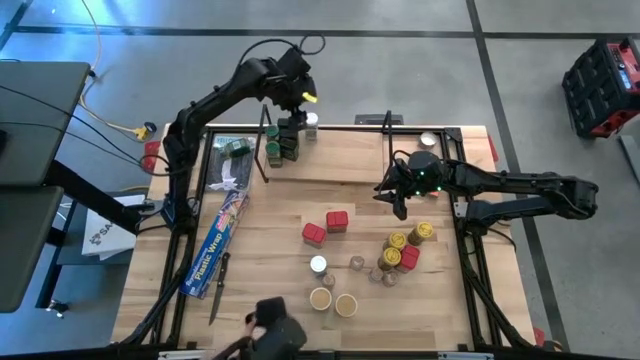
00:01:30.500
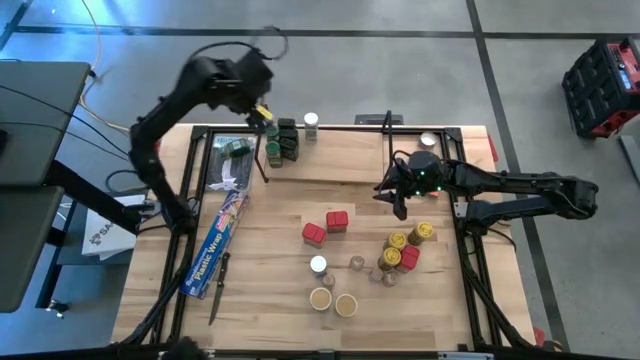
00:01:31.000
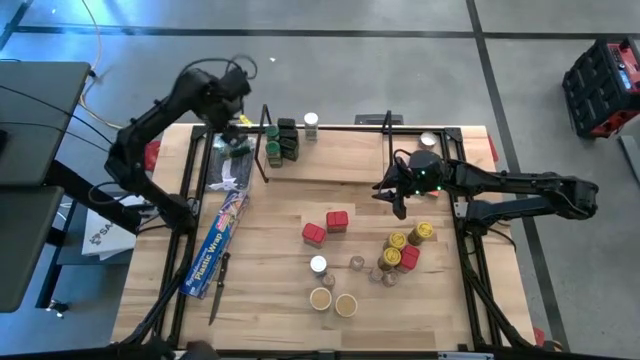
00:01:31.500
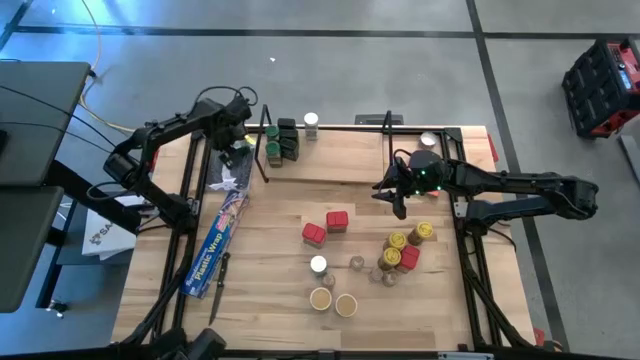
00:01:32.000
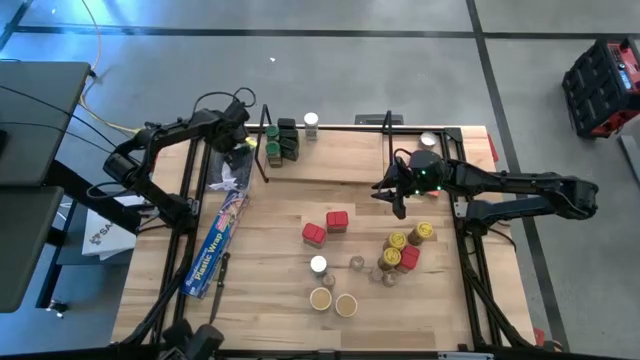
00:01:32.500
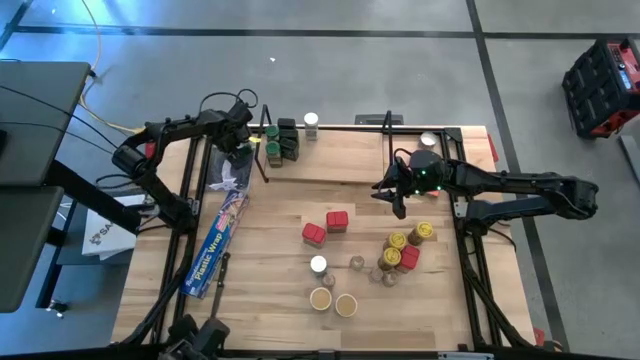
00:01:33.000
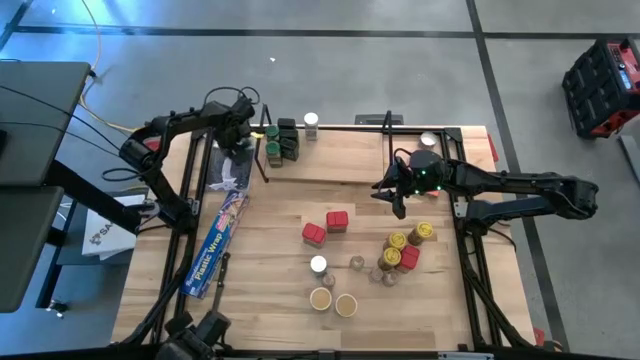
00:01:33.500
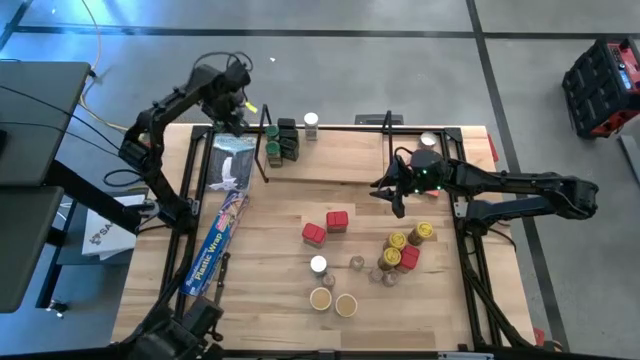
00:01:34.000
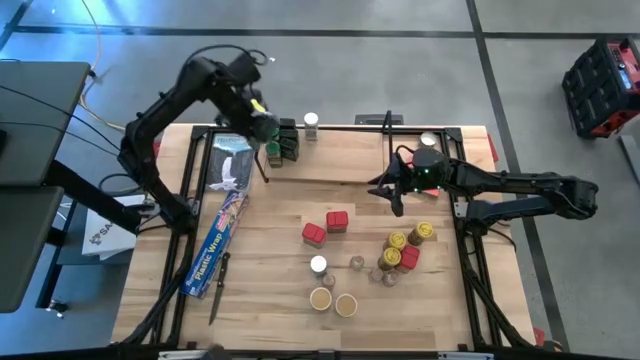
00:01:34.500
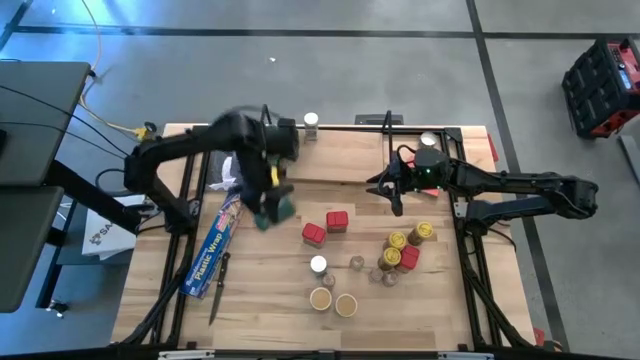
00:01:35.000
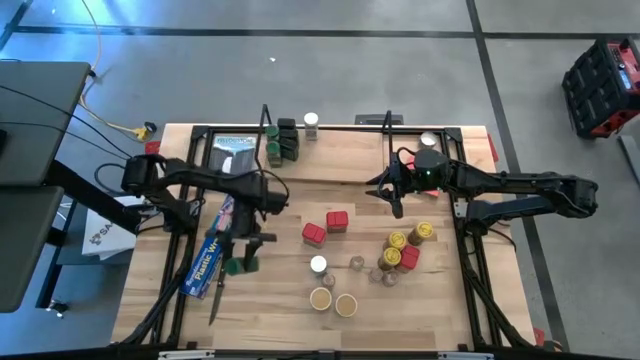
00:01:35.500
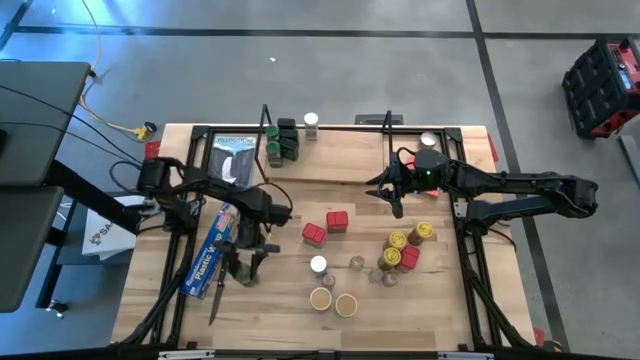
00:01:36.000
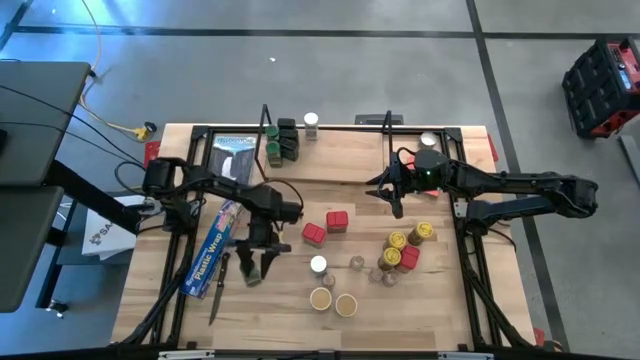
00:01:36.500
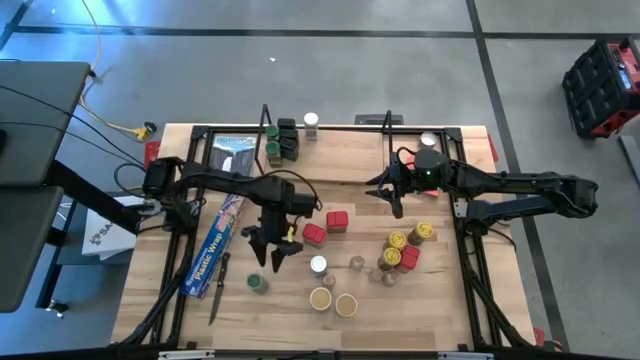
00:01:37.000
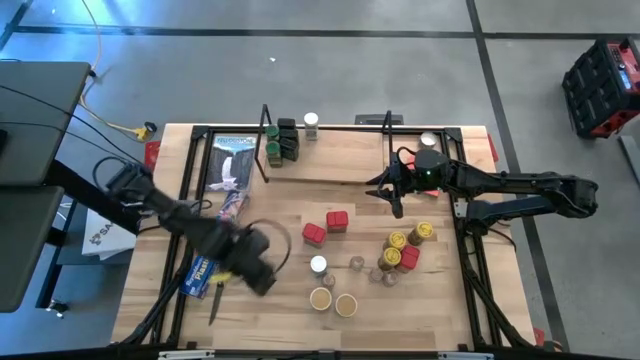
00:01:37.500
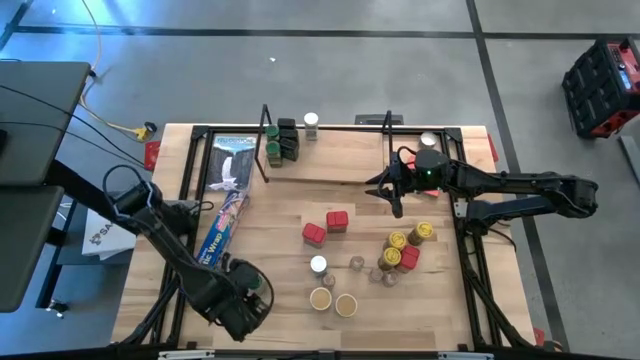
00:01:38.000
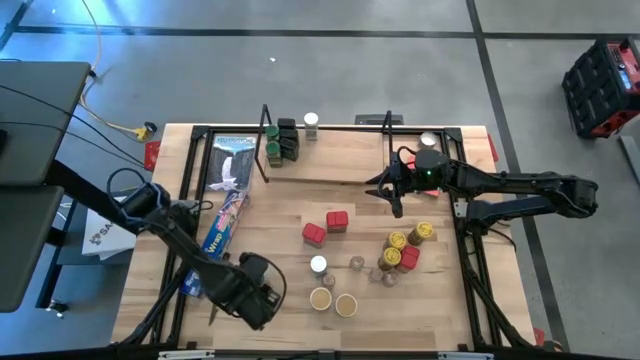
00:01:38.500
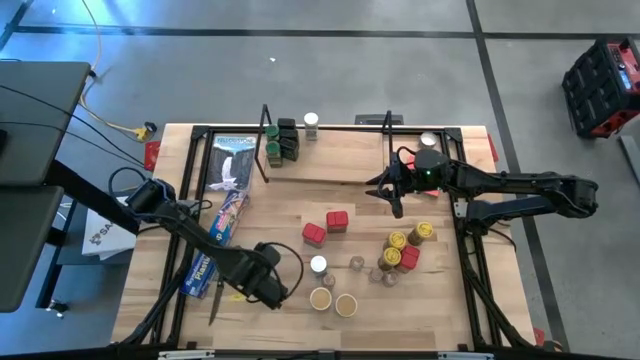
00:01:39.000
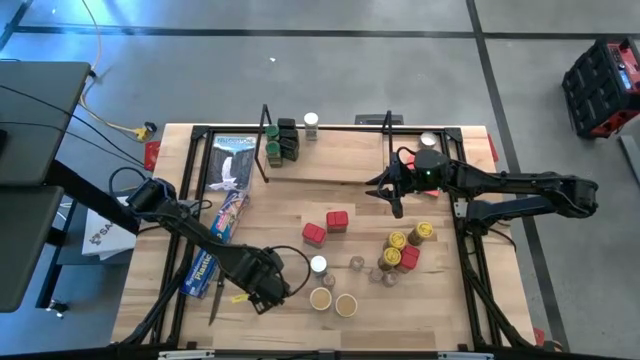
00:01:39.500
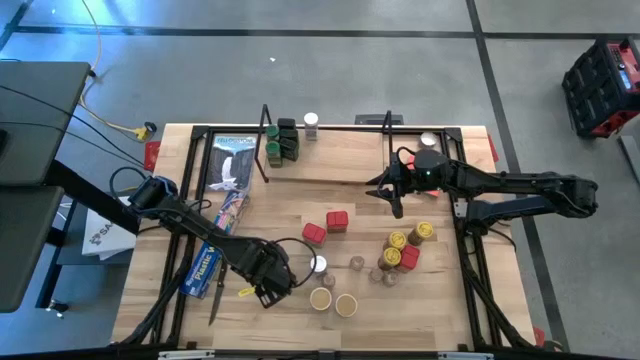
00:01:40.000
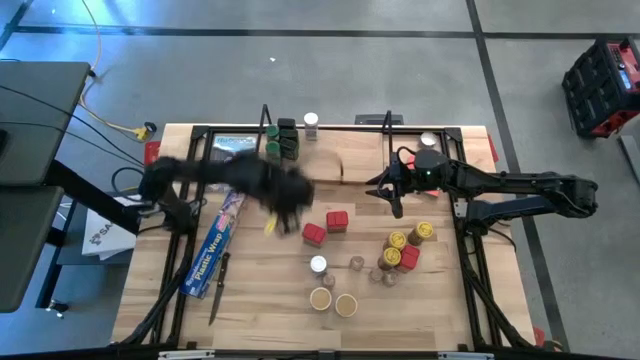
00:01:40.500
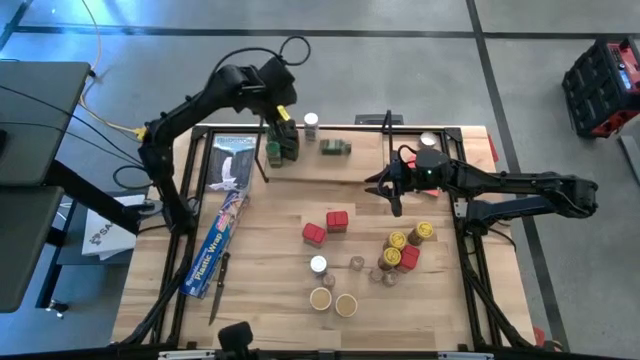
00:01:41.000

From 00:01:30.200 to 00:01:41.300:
Task: Shelf spices
Put the green seasoning bottle on the shelf and align it with the other green seasoning bottles

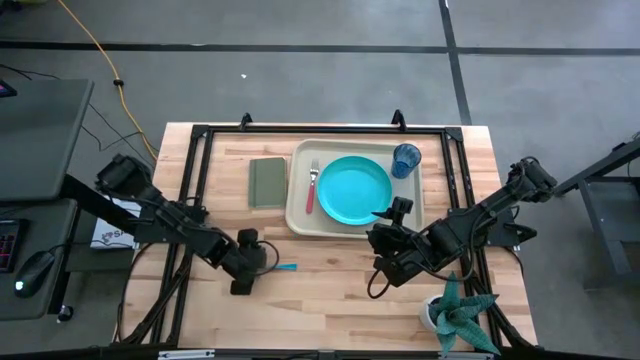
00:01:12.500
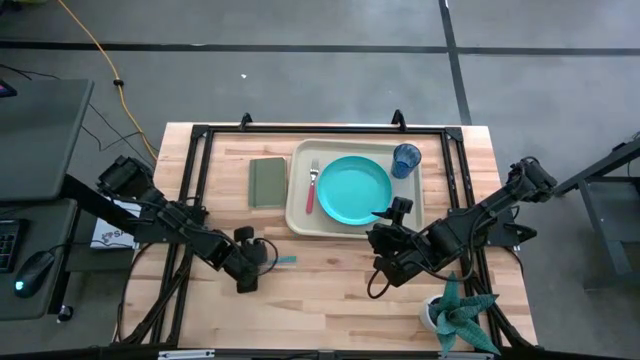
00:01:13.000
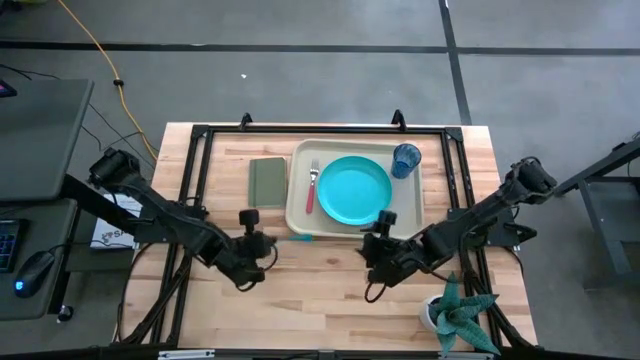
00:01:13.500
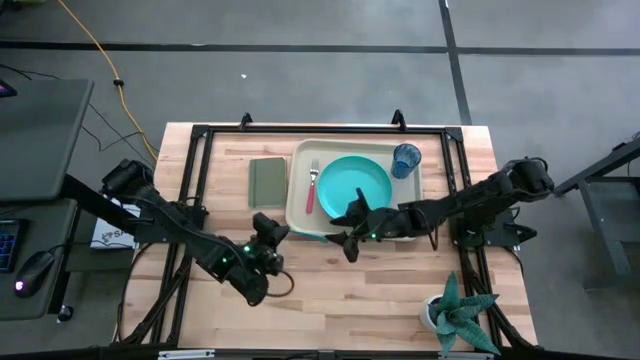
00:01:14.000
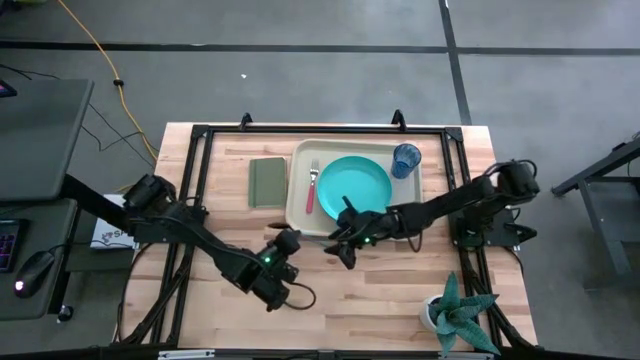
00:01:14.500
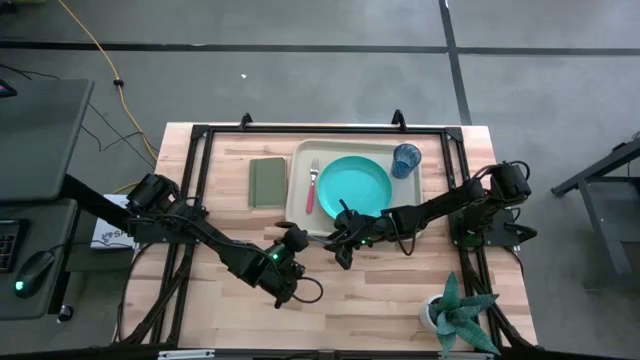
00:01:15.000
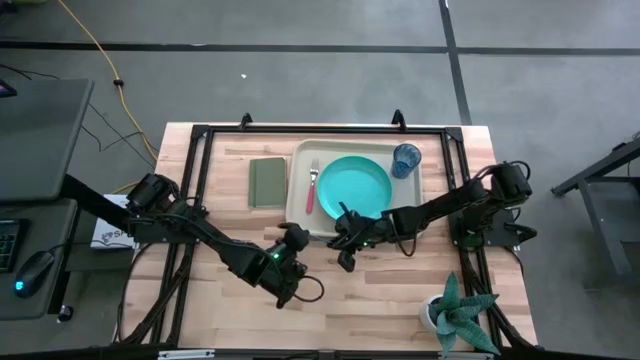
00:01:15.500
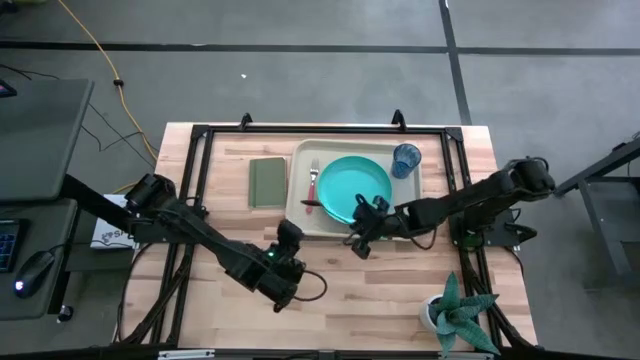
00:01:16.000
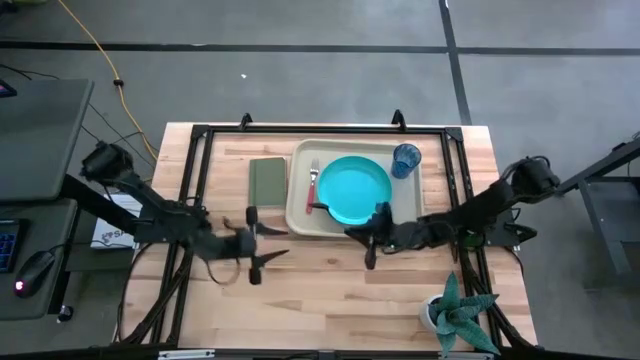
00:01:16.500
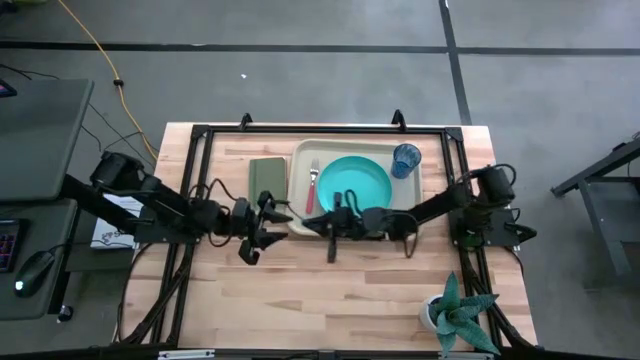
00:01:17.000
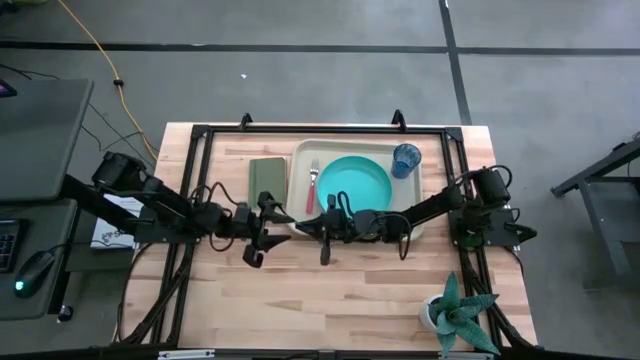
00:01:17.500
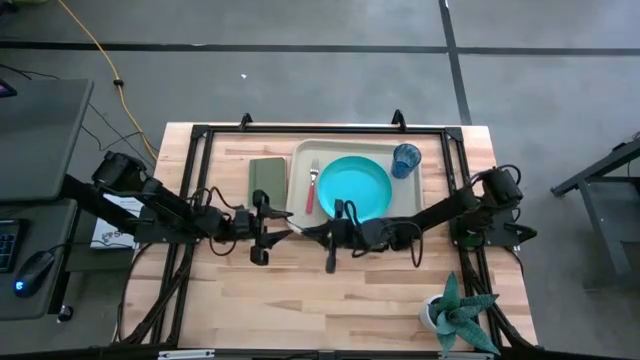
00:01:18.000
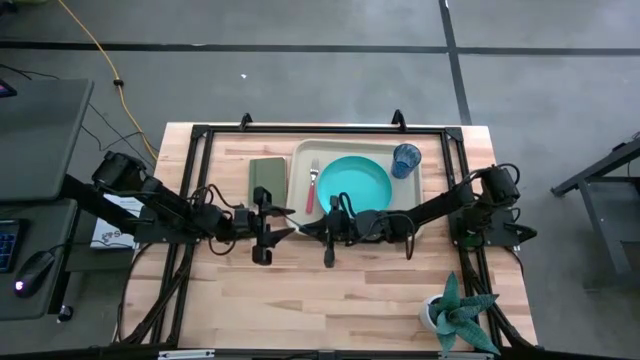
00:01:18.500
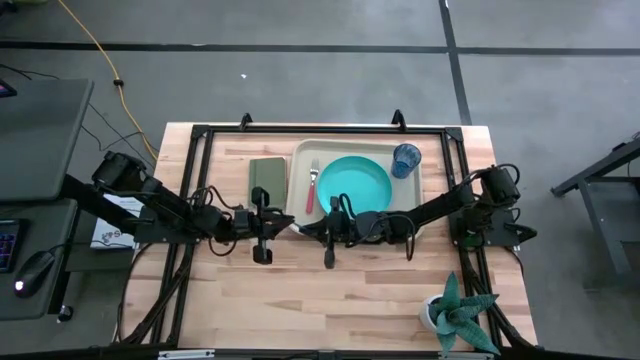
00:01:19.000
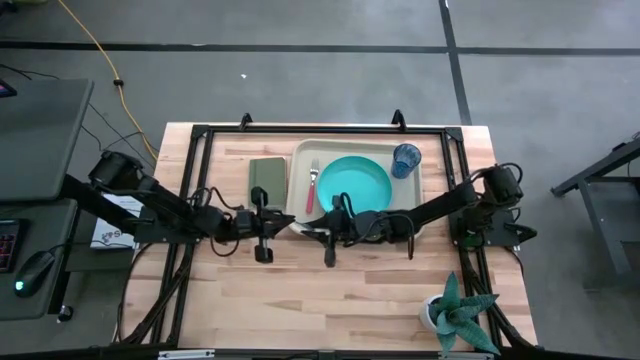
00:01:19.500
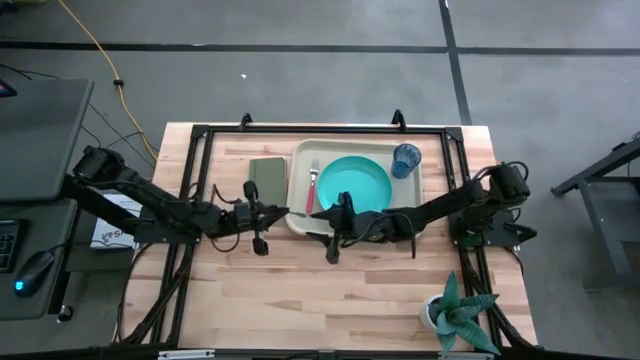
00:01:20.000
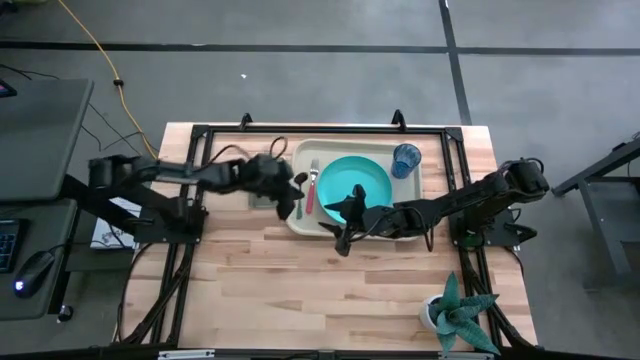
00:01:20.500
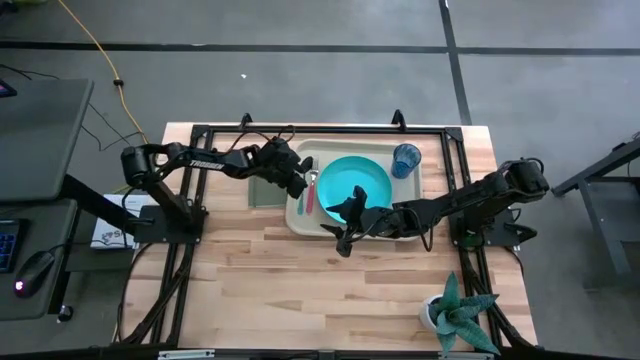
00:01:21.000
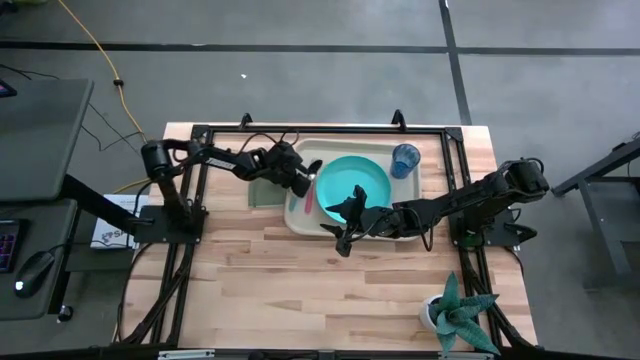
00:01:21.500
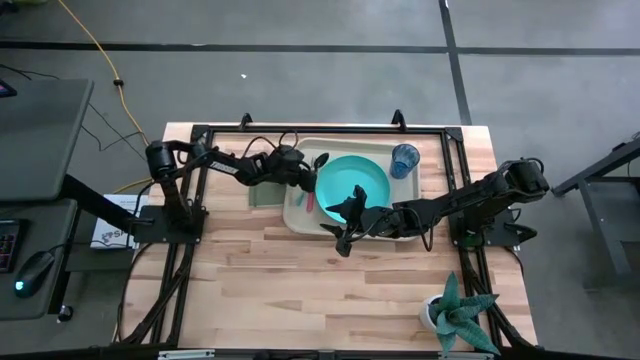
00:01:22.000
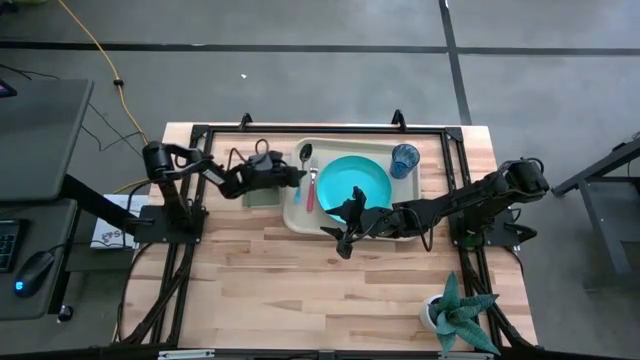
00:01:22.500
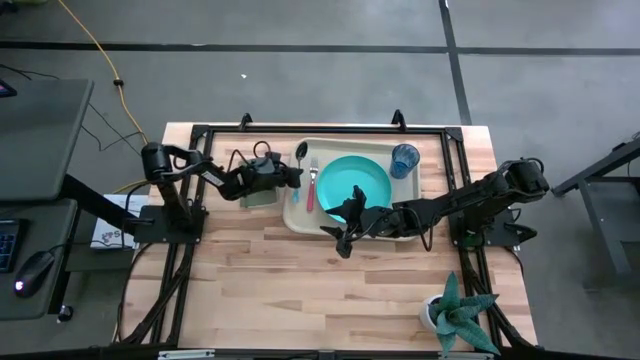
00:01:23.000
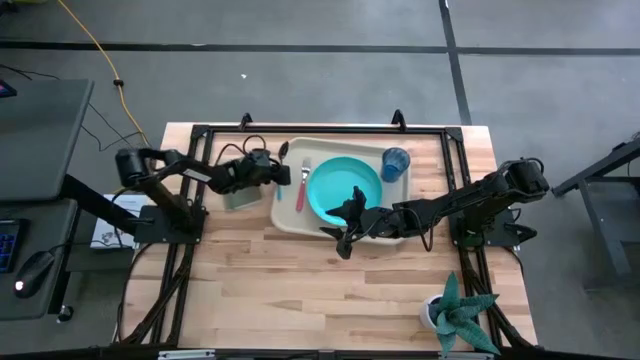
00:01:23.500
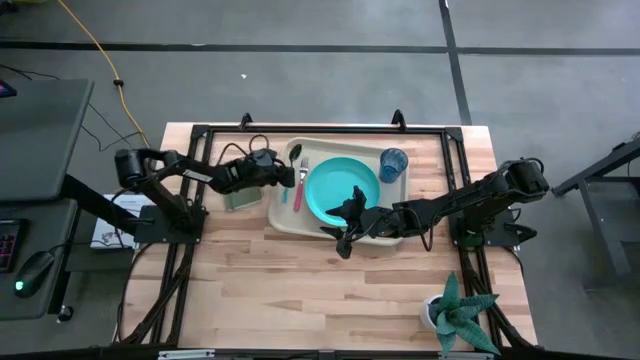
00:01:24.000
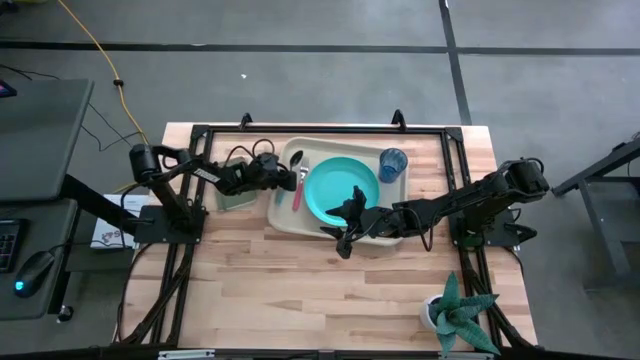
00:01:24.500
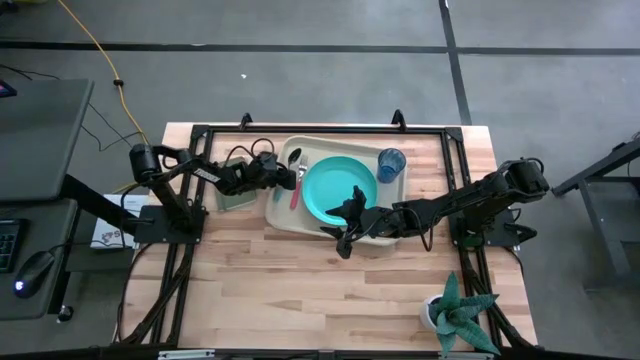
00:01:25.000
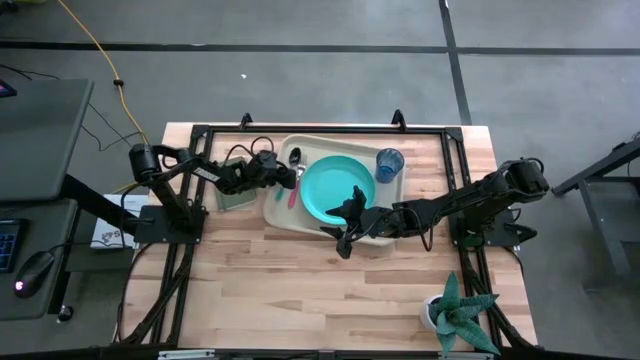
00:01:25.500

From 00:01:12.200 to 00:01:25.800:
Task: Pick and place plate/cup/fork/spoon on tray
Put the blue spoon on the gray table tray to the left of the pink fork
